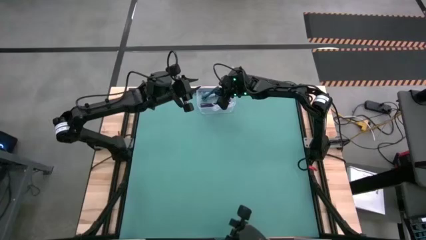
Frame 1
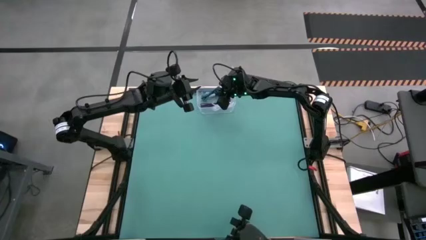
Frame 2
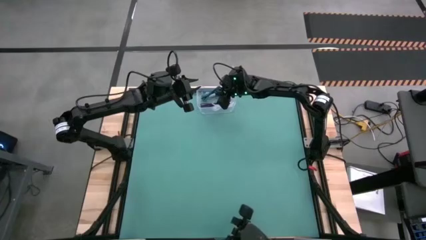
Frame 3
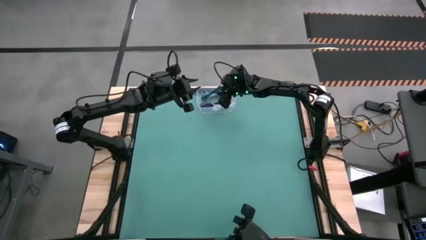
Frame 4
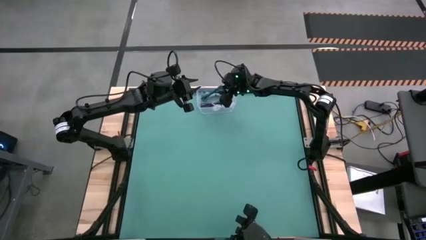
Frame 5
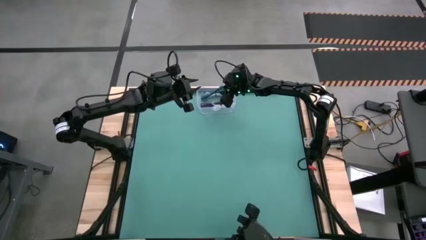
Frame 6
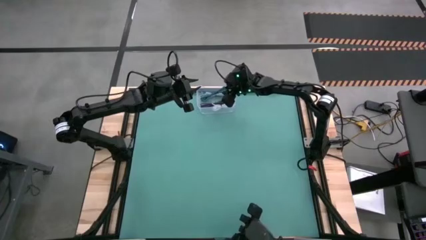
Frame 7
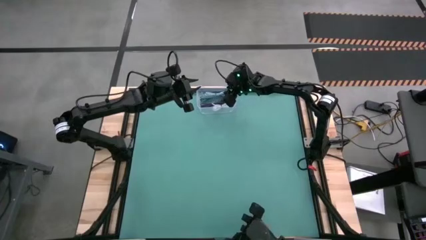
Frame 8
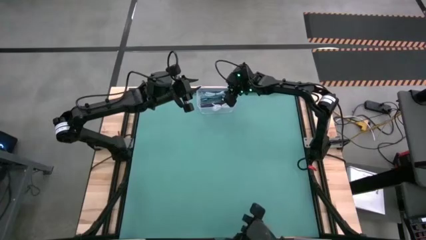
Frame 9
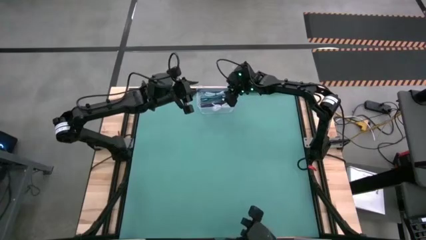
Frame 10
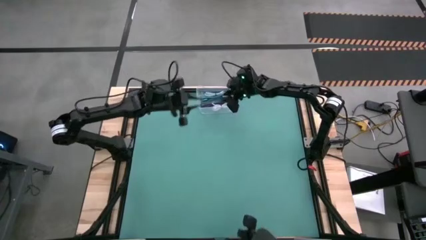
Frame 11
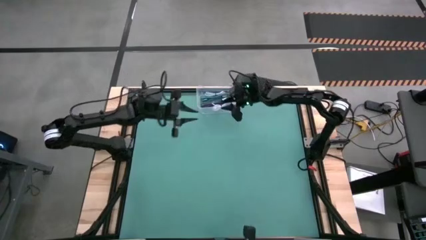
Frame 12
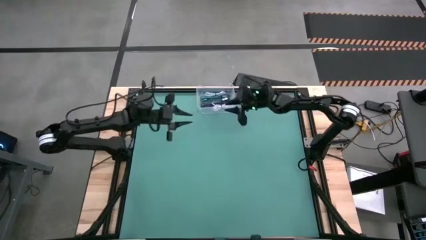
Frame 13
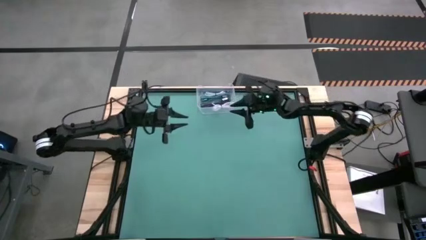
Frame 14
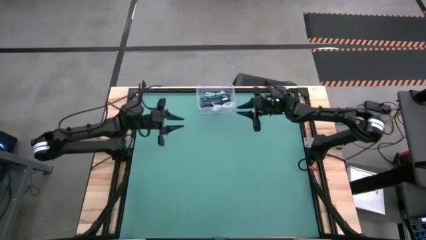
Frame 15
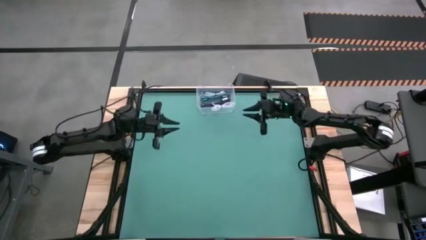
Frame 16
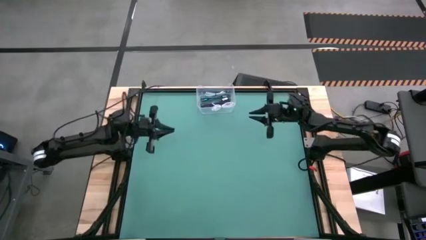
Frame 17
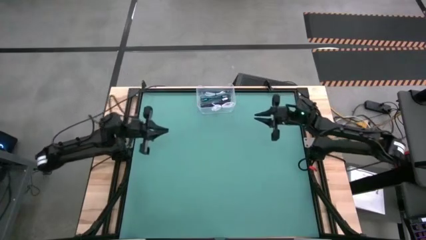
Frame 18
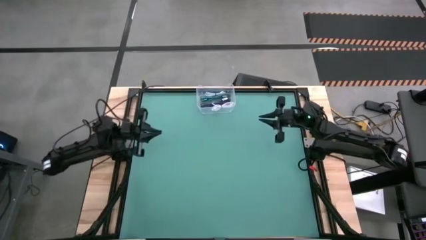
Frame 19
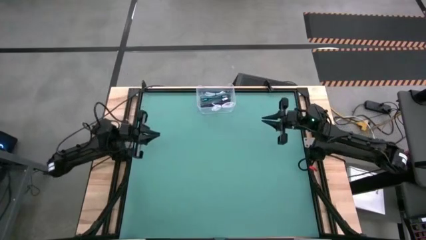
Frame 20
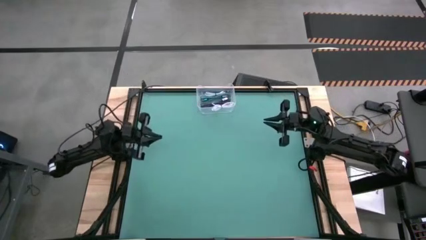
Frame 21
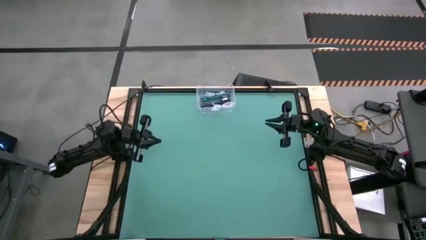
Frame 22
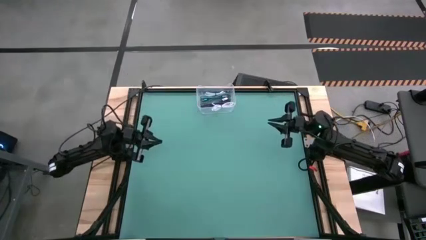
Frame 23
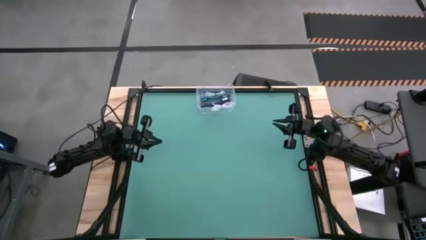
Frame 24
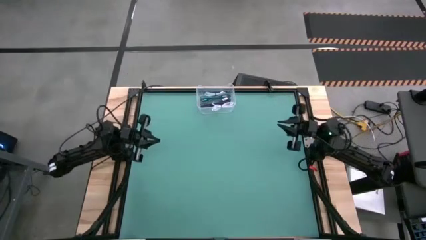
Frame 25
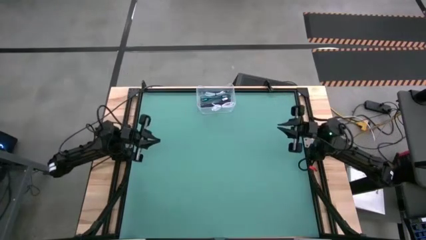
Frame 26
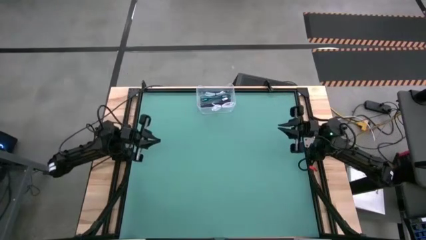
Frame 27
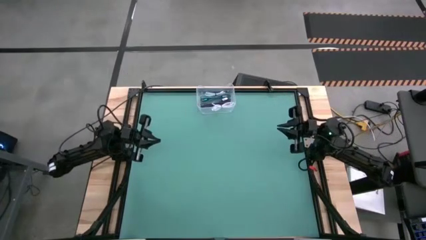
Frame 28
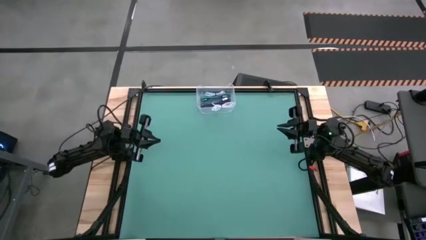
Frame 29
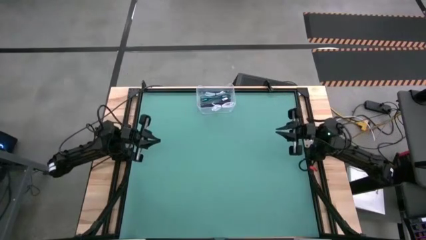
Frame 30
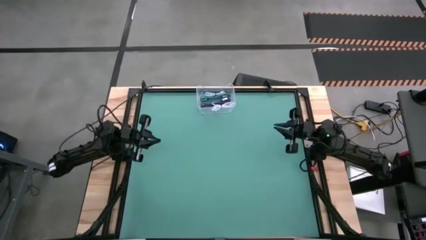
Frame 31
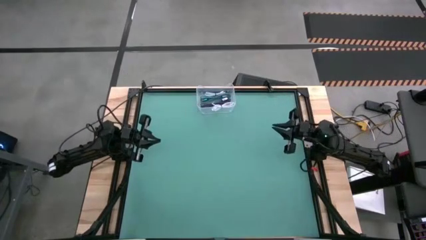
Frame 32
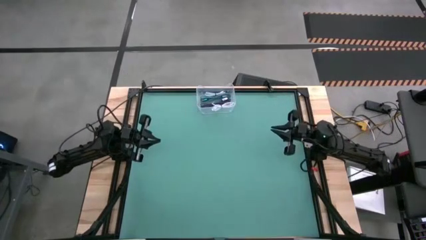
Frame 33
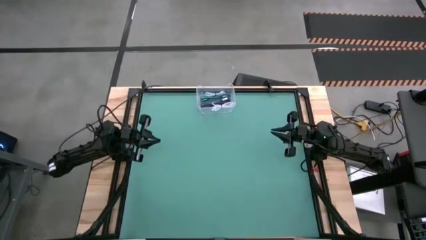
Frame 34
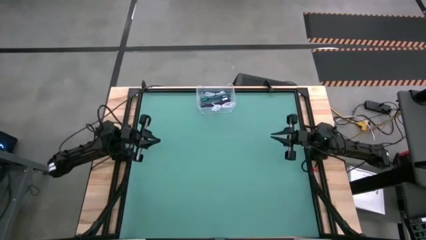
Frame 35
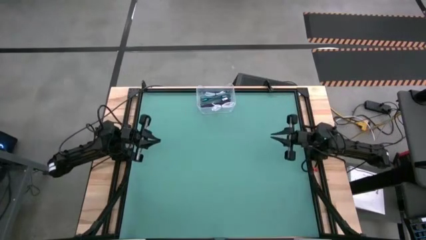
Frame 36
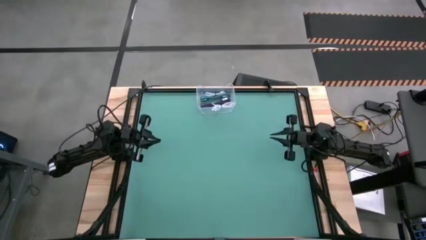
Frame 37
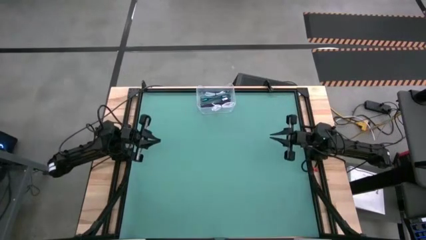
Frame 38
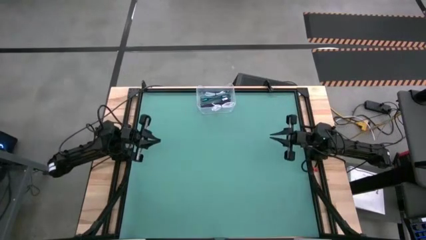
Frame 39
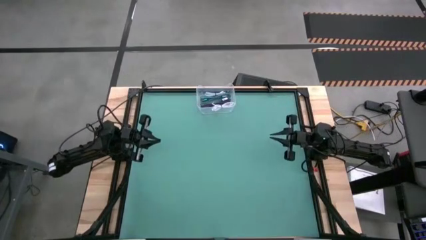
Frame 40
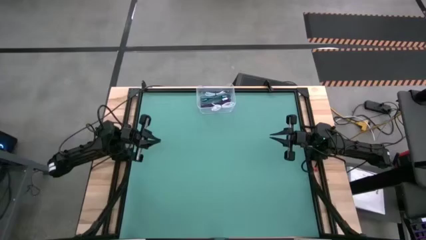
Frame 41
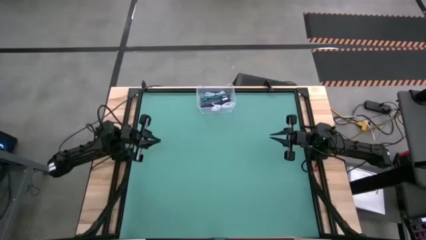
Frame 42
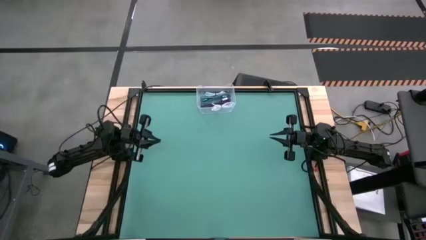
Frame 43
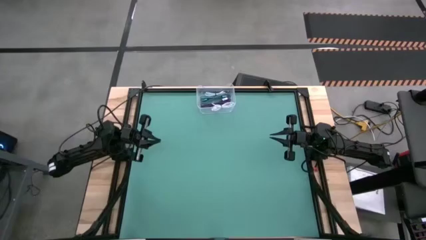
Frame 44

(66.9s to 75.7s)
Task: Pick and place USB-C Cables
Return to Home Position

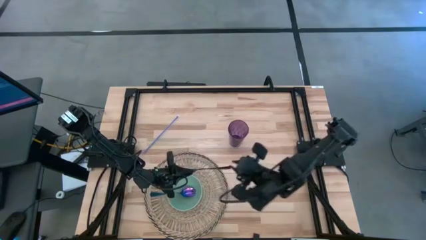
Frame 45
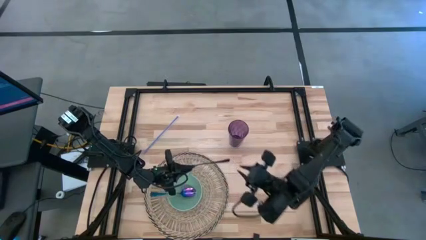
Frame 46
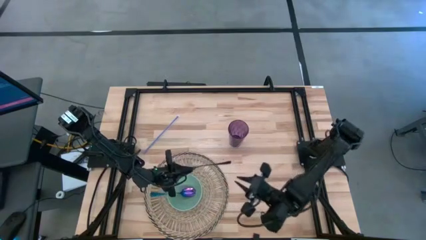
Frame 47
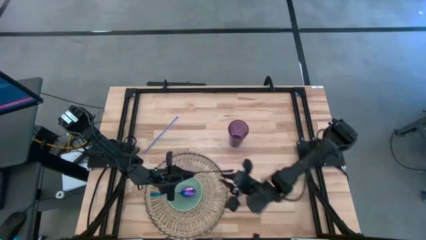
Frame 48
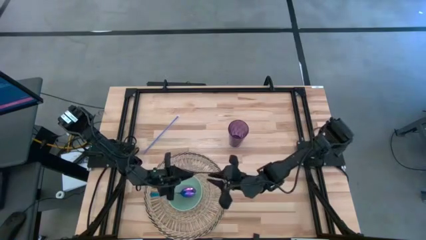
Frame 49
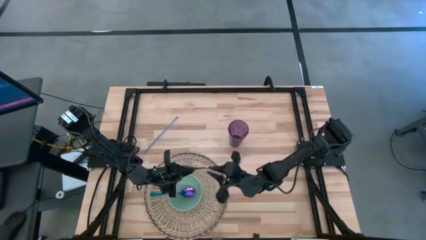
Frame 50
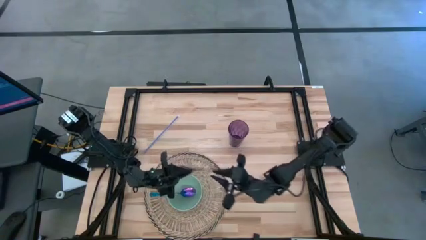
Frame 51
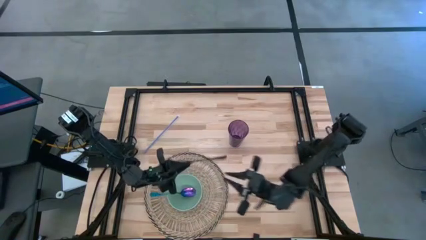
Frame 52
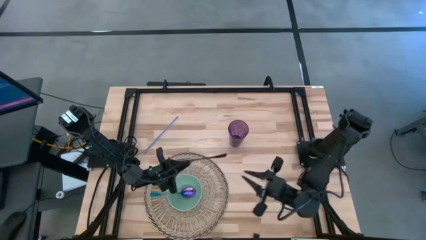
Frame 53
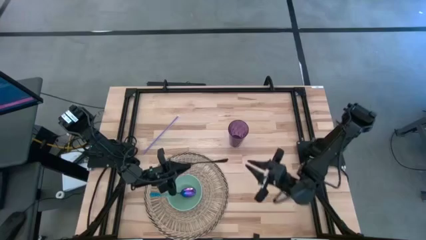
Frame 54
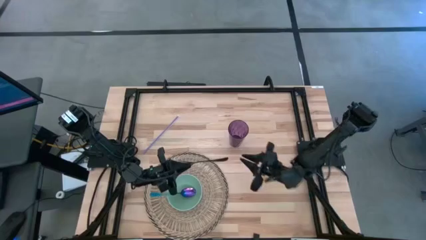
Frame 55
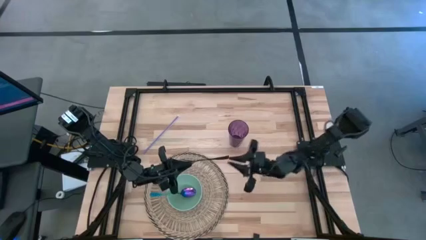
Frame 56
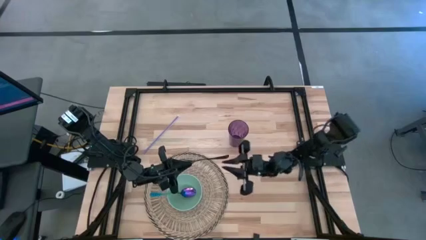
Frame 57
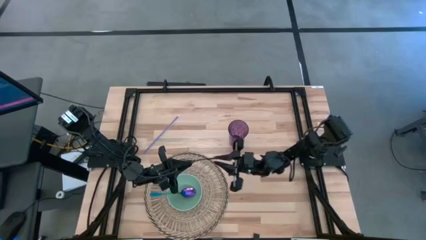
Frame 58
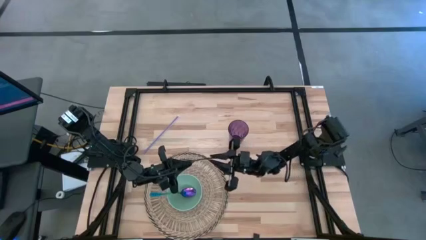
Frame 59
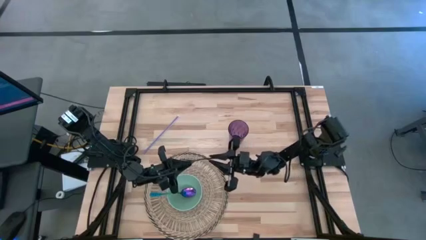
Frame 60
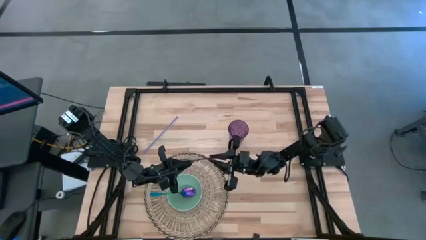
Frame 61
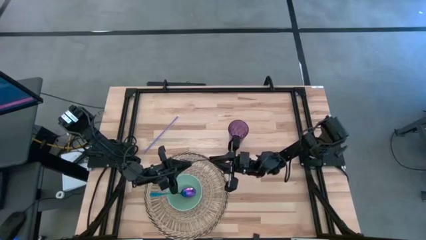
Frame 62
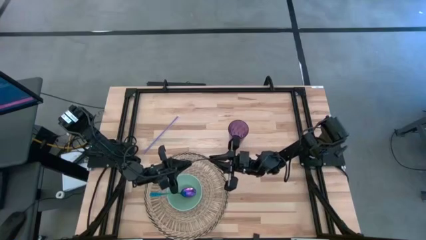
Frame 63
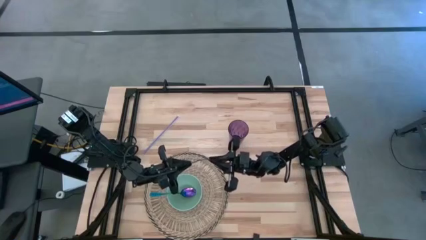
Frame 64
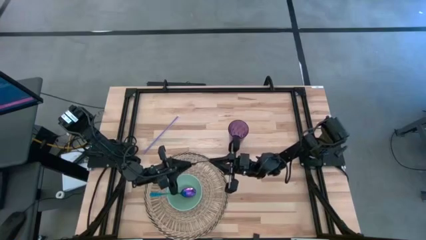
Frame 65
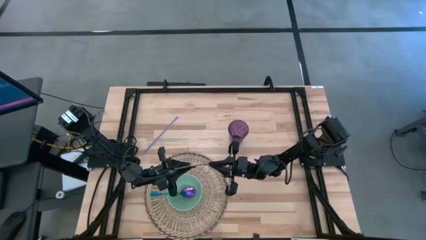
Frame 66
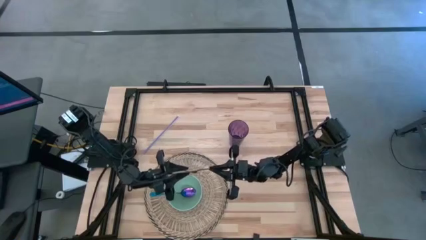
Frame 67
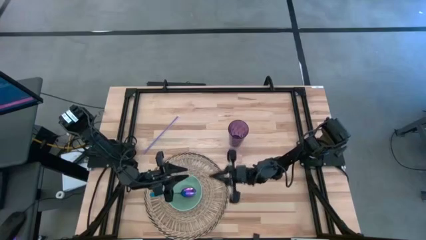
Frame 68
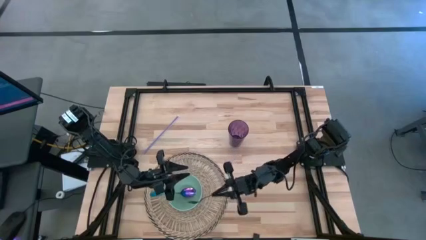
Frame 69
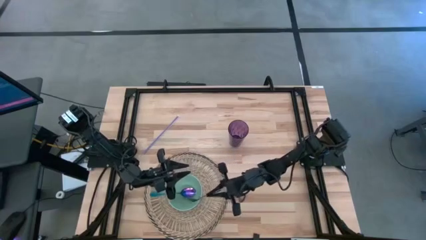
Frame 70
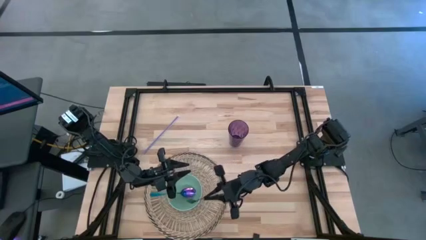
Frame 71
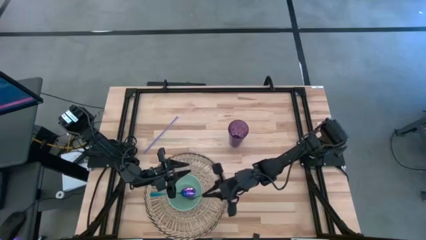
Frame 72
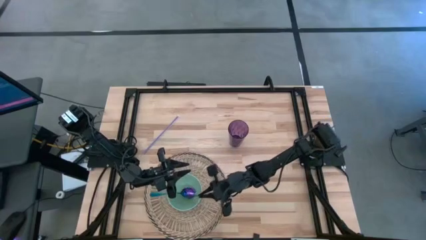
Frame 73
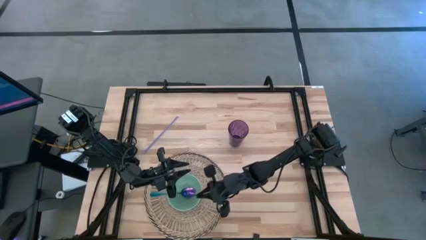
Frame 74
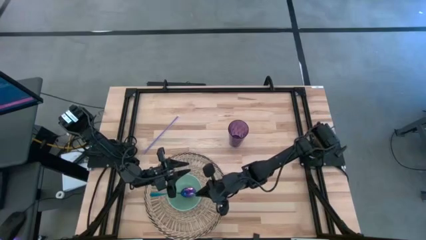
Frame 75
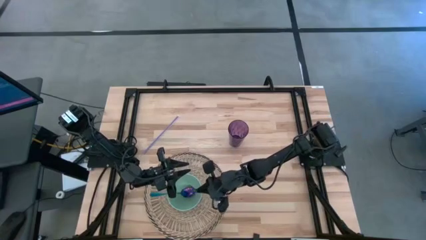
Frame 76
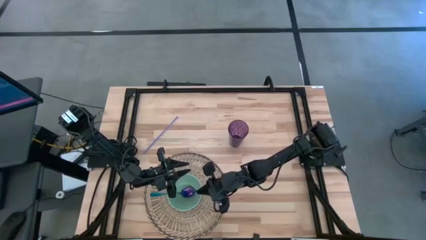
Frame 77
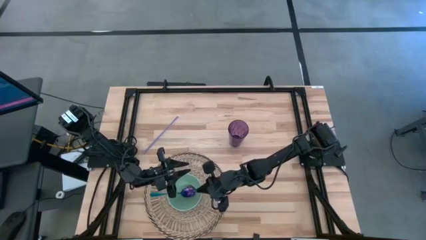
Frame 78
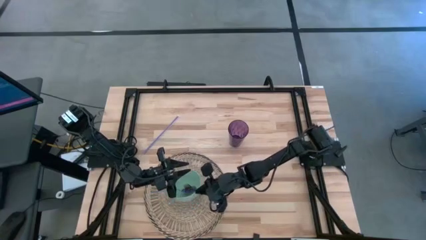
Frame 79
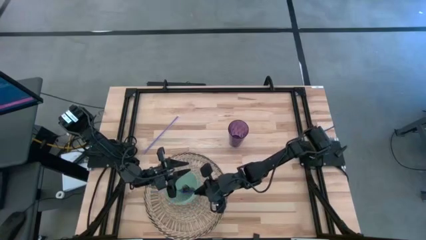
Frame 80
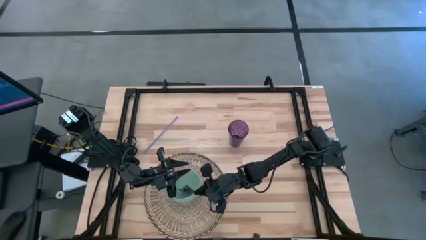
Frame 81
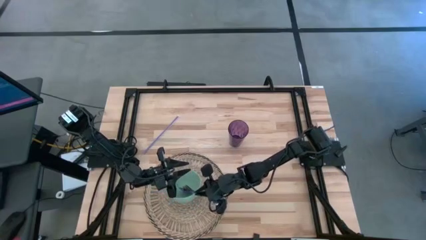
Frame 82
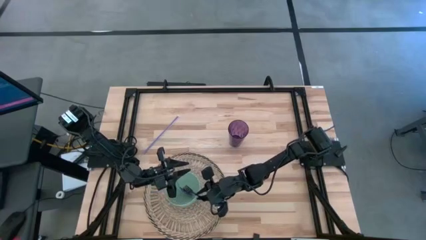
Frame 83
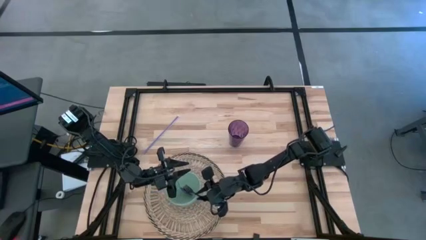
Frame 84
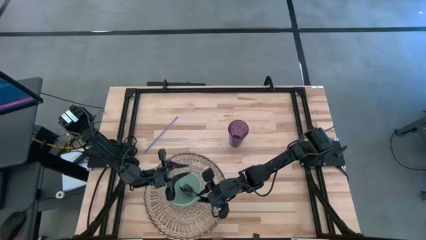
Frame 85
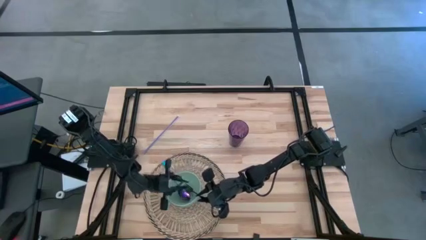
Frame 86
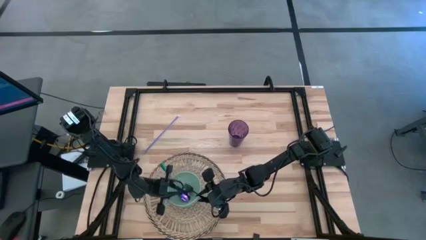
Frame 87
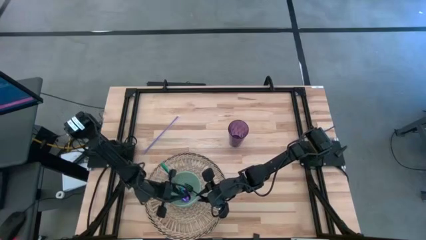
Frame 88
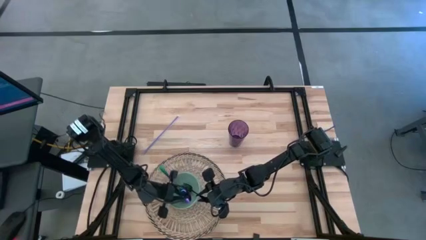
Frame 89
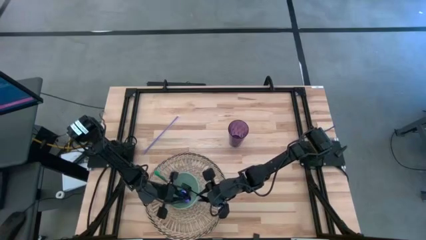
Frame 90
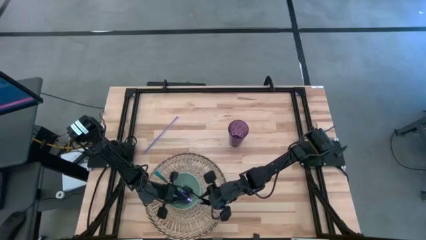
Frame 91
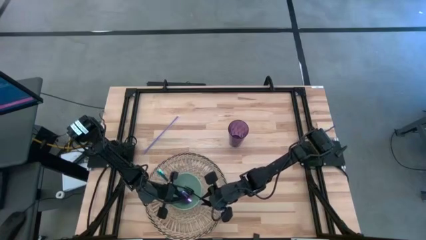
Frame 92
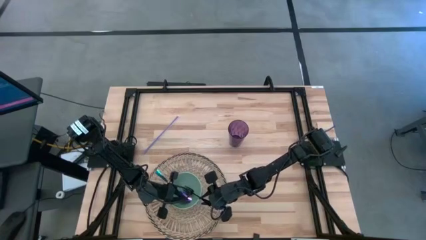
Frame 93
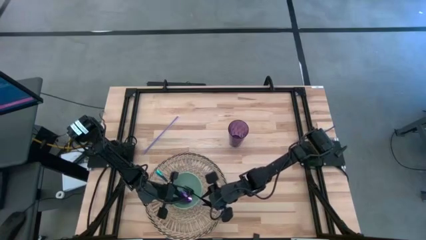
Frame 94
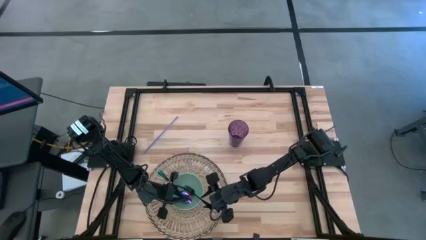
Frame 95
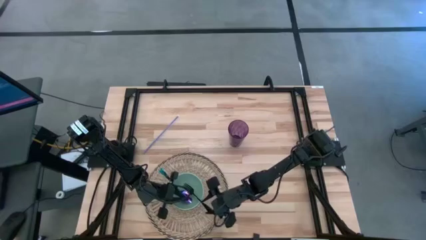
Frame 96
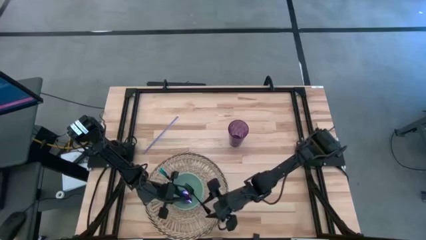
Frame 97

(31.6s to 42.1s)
Task: Pick & Place Utensil
Put the black fork into the green bowl on the brown mat
